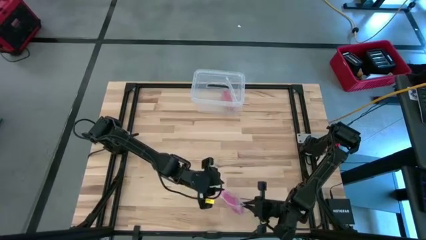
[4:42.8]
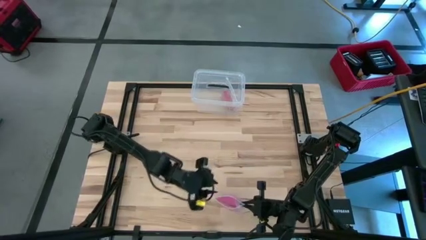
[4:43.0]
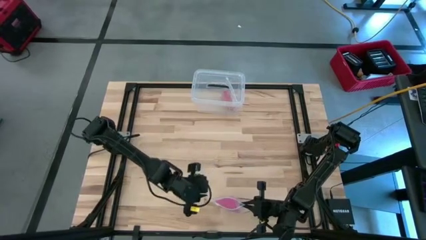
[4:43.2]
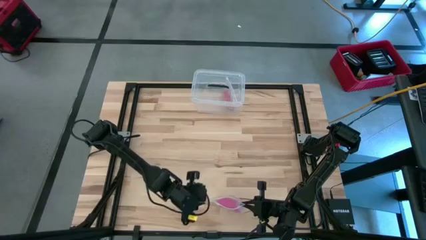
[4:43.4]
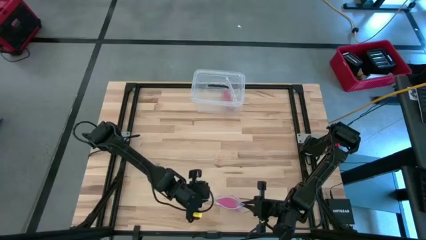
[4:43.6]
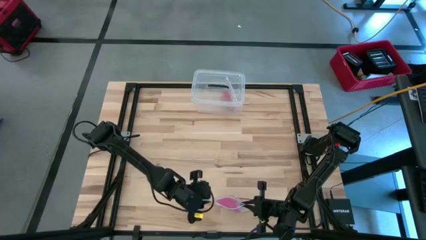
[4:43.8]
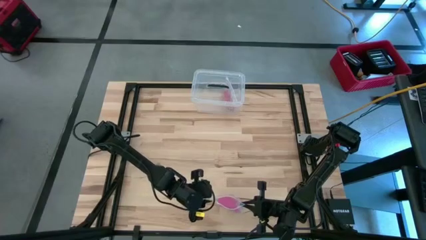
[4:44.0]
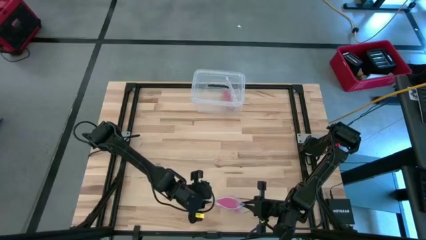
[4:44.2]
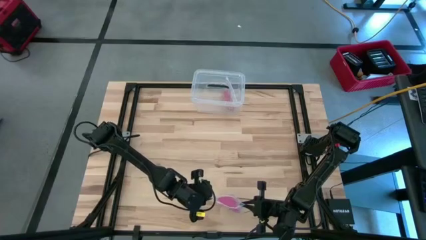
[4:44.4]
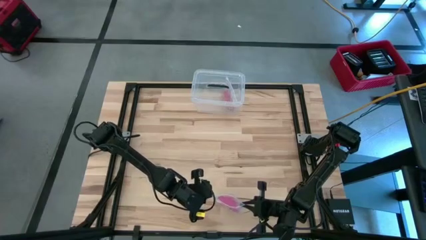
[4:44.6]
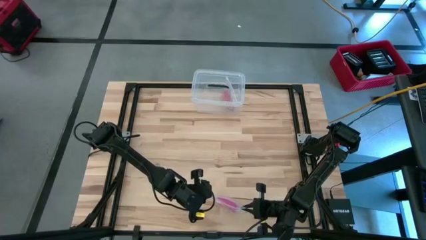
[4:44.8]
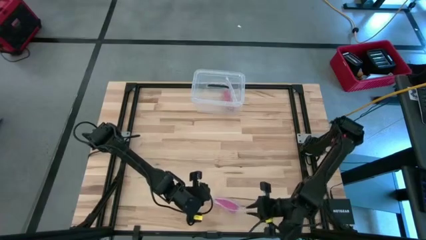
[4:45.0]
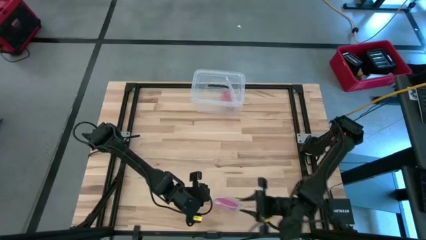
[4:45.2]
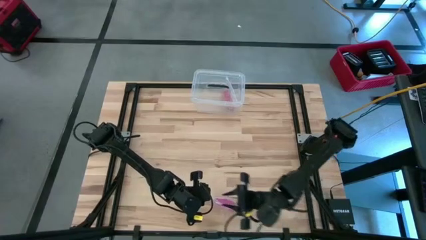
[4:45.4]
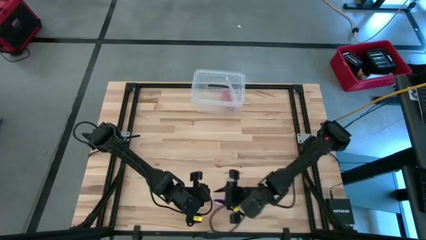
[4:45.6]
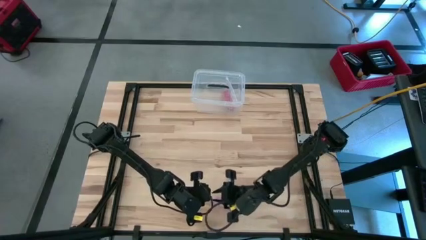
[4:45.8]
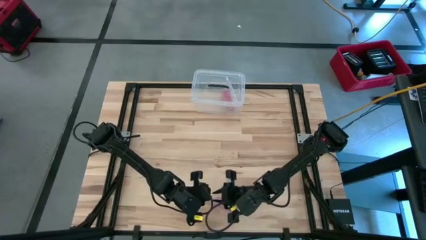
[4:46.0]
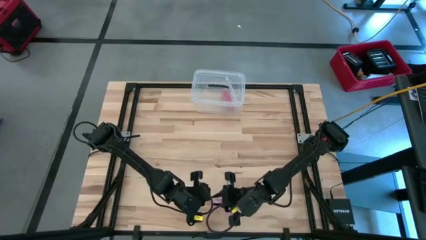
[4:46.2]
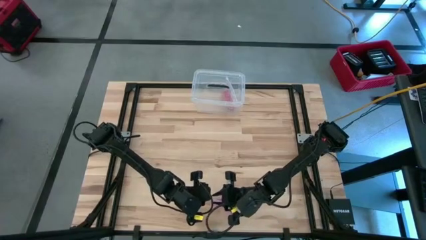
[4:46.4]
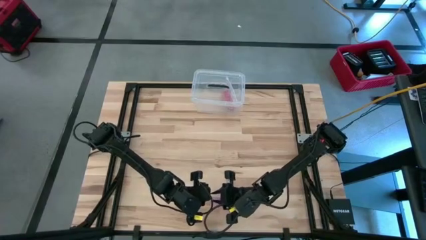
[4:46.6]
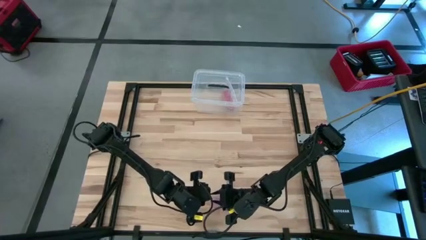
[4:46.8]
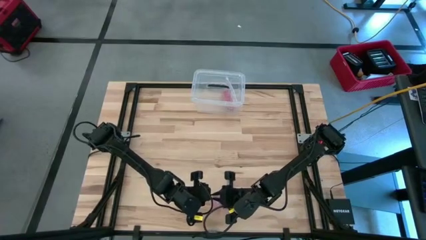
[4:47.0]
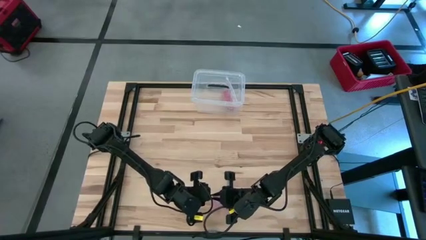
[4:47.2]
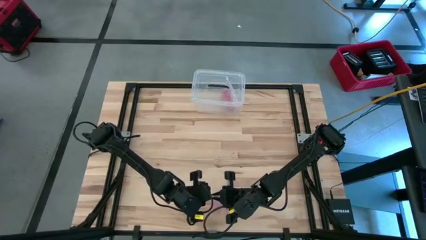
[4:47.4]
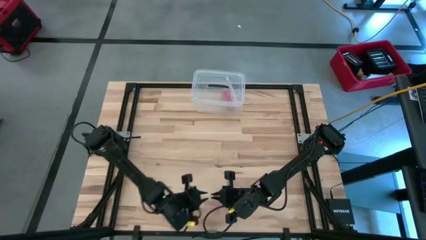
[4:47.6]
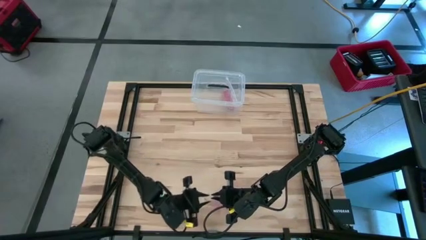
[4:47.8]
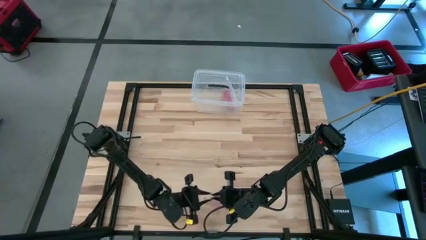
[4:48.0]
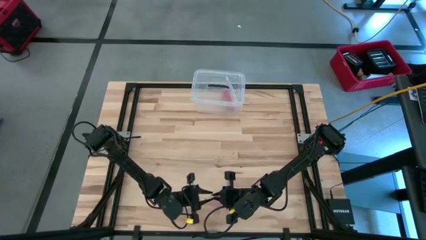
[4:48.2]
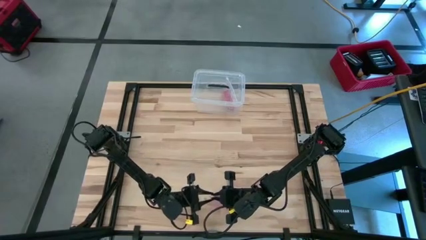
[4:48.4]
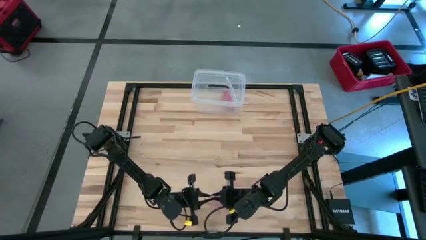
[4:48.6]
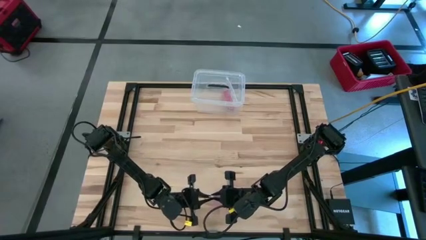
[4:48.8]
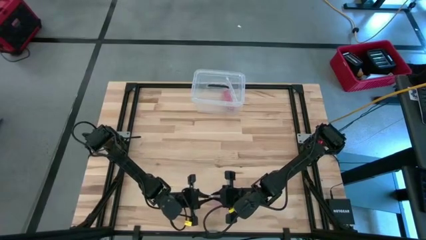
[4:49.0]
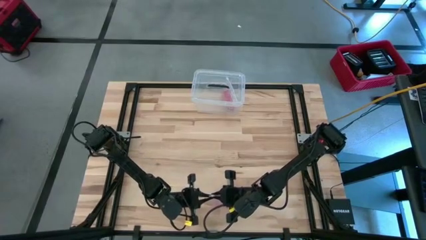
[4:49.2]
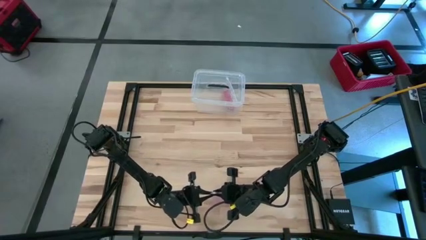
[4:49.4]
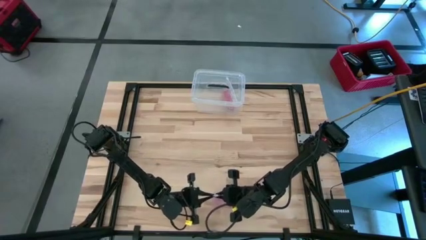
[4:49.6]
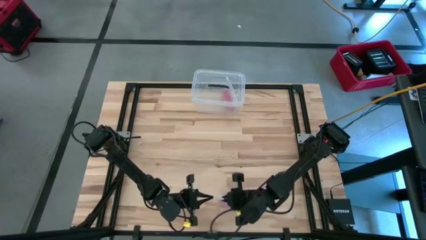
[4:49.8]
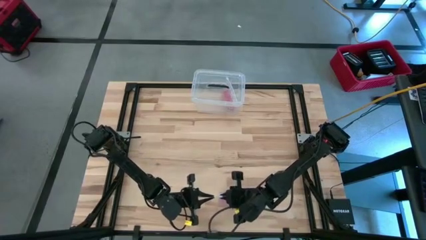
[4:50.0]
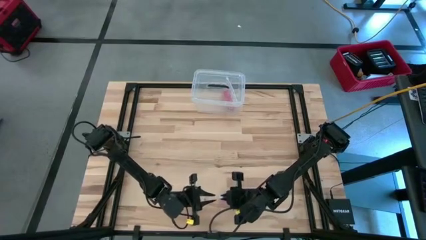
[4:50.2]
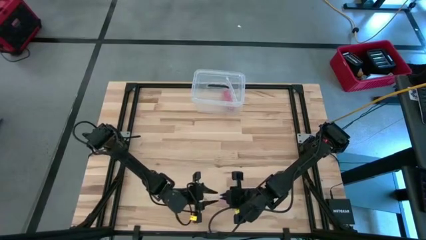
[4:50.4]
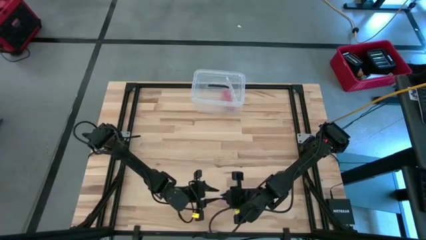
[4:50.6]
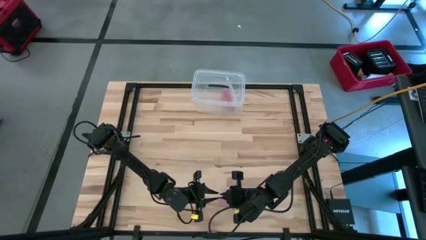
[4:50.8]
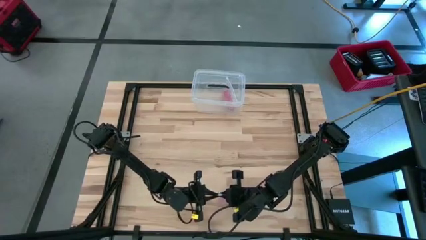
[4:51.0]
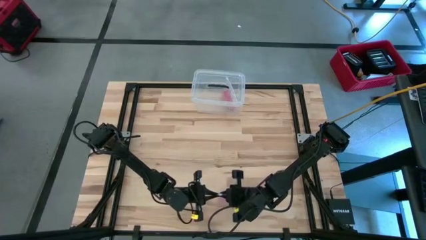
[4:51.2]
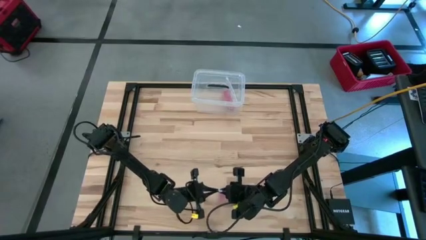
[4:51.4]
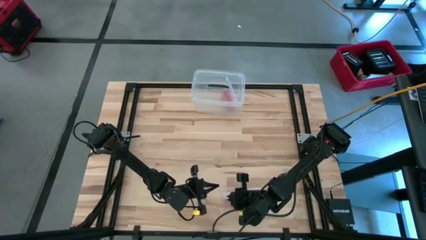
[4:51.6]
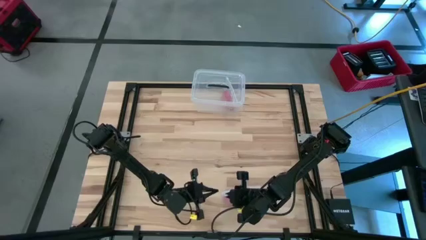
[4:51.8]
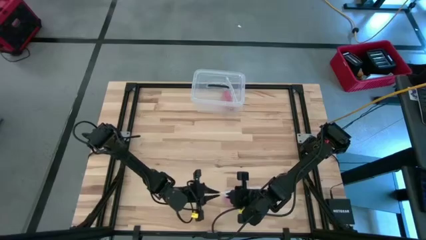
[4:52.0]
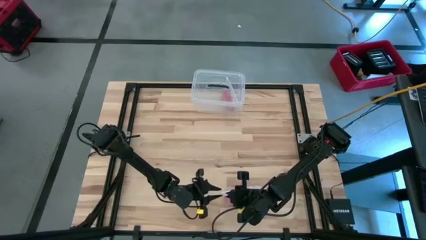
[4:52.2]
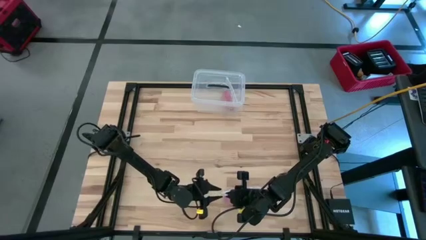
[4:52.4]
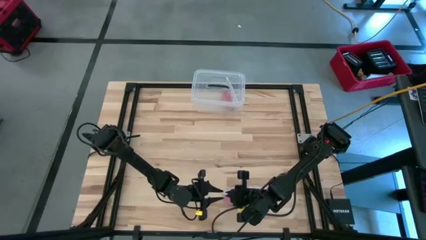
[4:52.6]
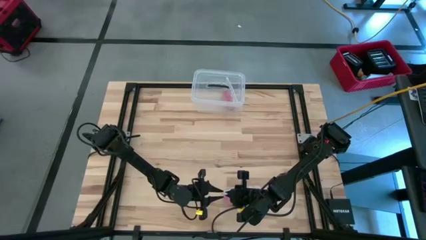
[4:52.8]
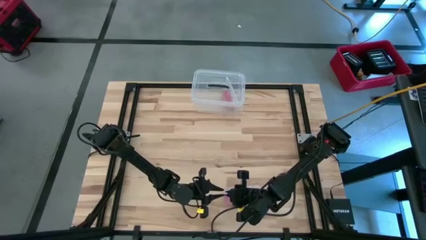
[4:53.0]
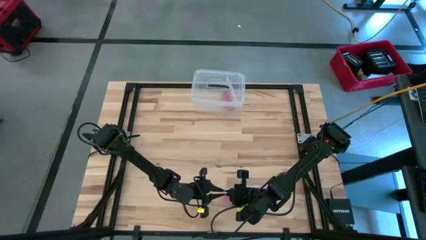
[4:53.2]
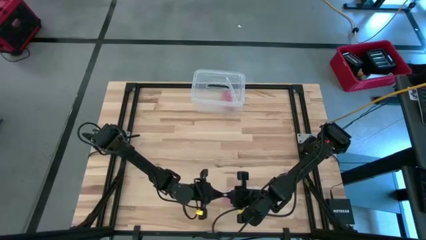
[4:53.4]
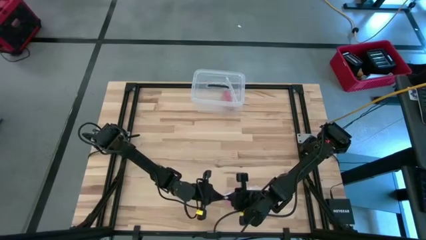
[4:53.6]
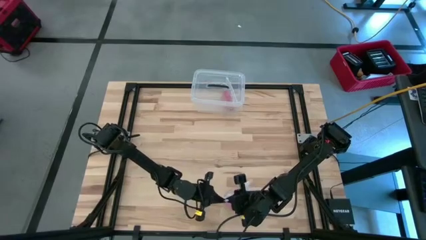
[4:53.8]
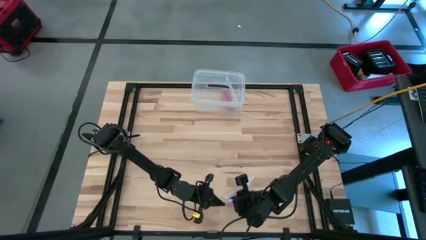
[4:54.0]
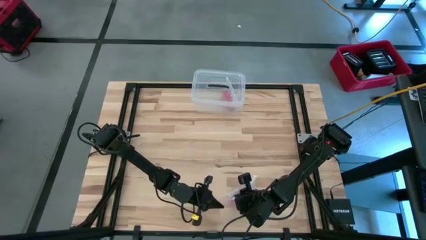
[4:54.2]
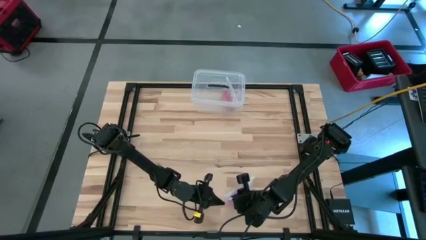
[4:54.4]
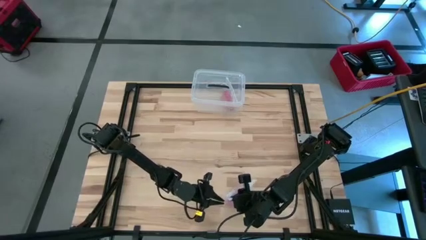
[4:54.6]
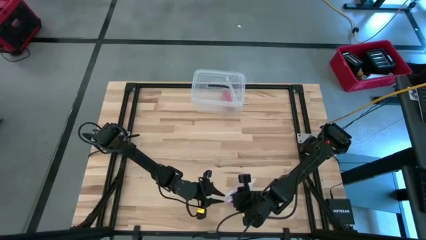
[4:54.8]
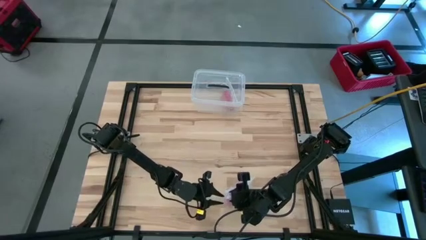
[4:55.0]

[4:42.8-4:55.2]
Task: Roll bandage
Close the transparent zip bag

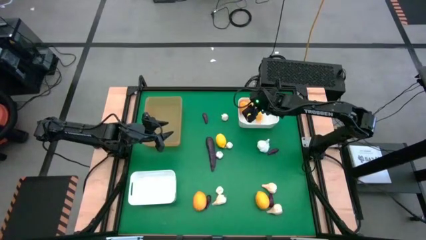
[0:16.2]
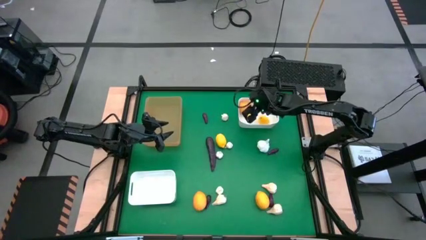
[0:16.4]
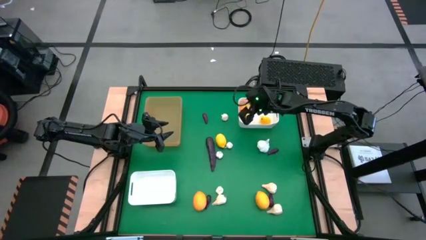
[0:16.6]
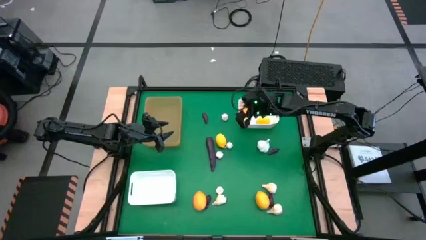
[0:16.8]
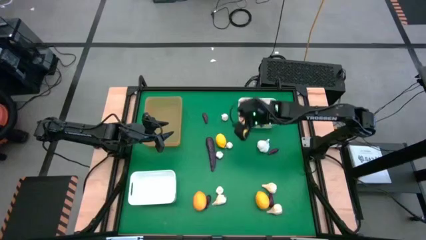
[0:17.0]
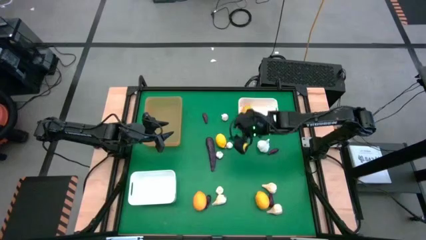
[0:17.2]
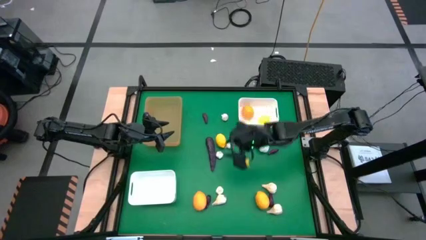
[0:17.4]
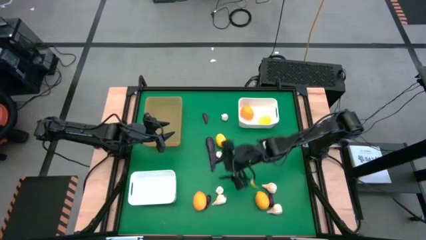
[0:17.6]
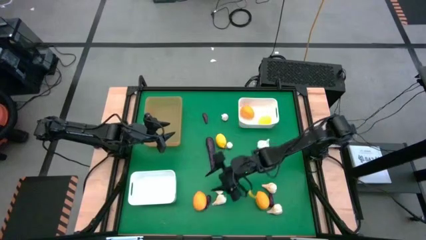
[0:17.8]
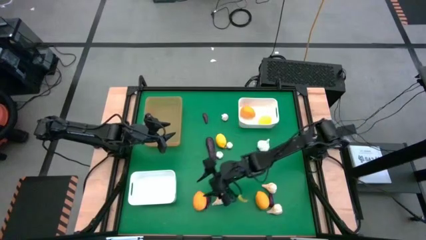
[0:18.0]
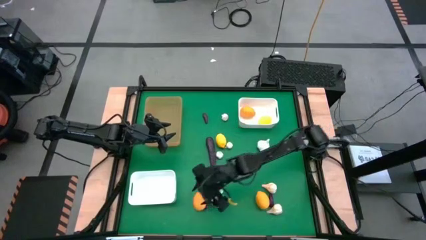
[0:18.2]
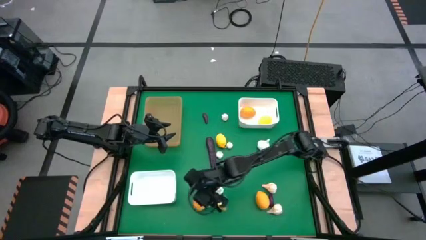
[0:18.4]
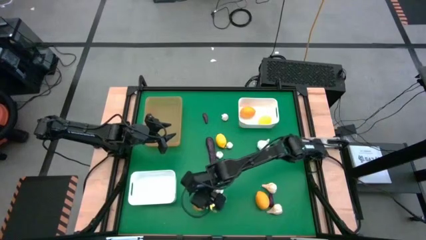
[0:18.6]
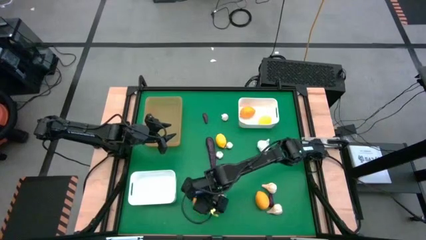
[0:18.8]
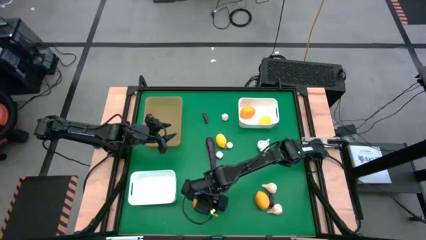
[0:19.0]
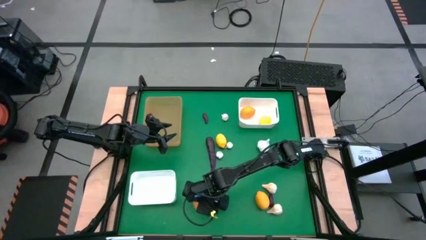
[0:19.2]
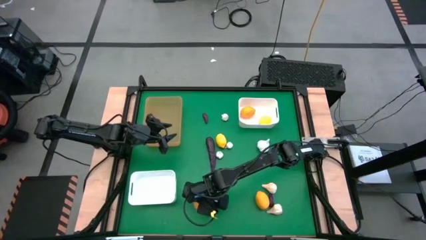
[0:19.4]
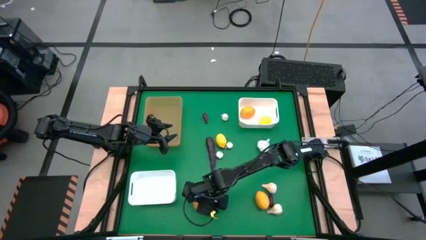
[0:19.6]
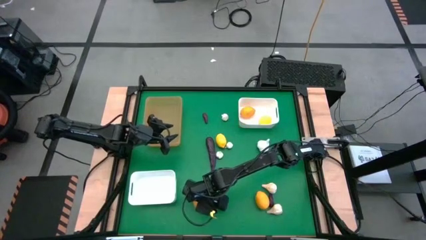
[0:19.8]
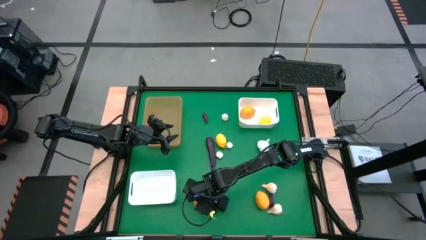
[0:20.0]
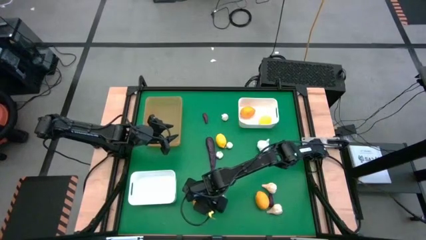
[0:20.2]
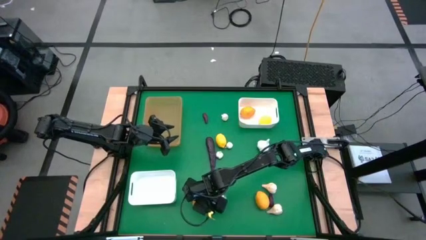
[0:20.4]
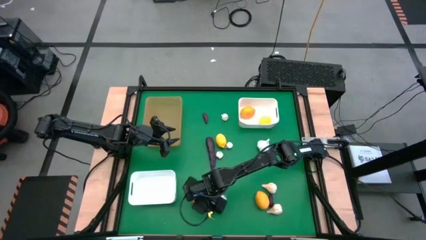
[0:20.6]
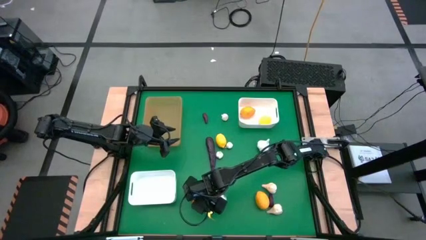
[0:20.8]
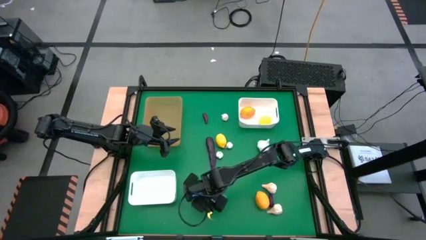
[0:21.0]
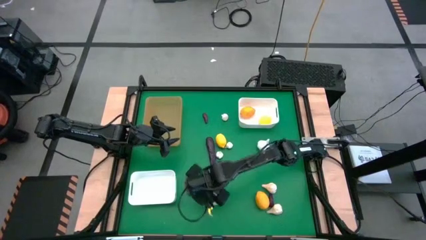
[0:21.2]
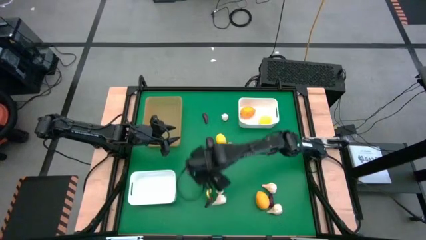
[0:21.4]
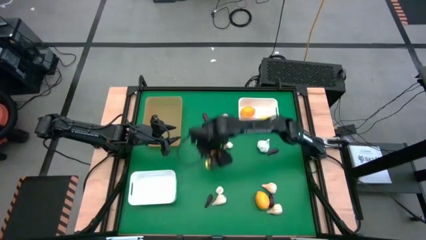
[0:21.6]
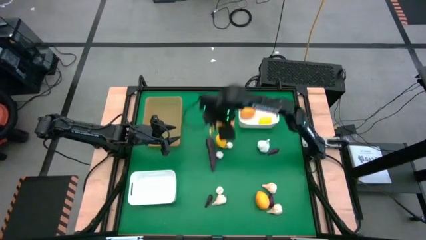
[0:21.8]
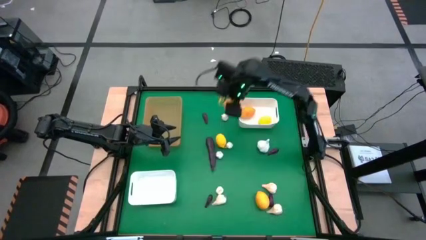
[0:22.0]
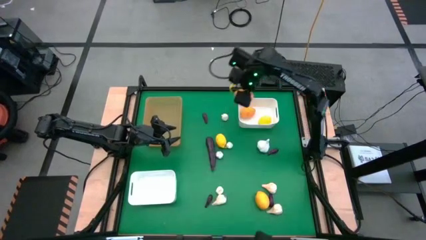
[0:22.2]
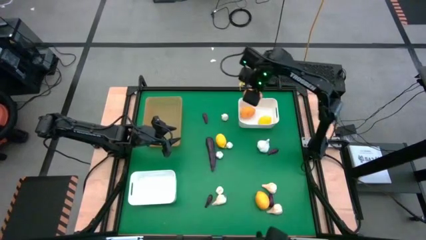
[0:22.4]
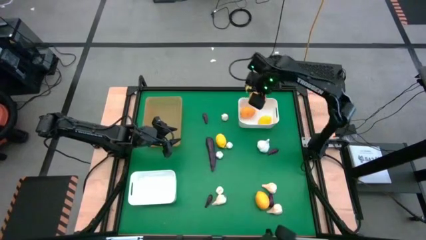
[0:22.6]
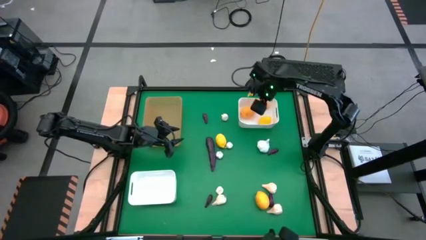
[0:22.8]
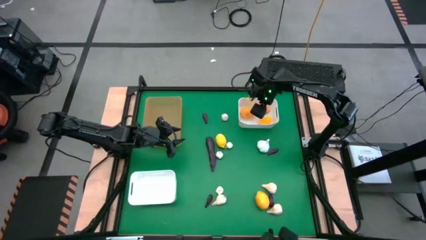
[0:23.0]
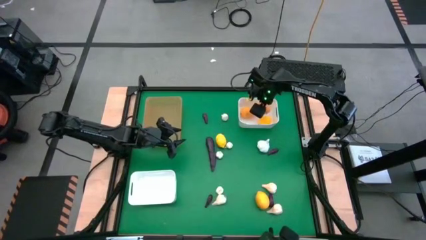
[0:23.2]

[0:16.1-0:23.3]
Task: Sort produce into baskets
Put the lemon into the top white bin
